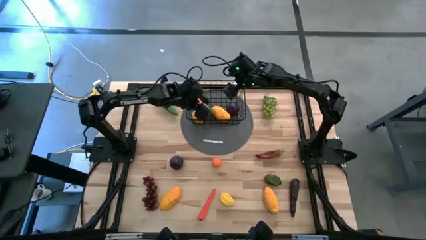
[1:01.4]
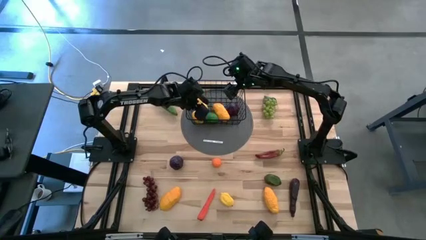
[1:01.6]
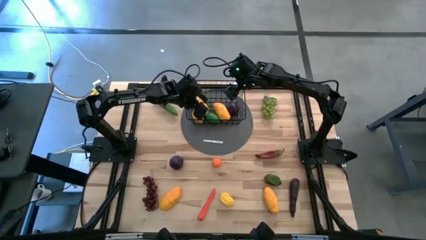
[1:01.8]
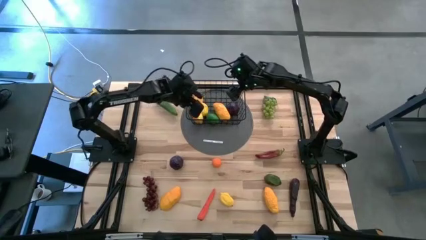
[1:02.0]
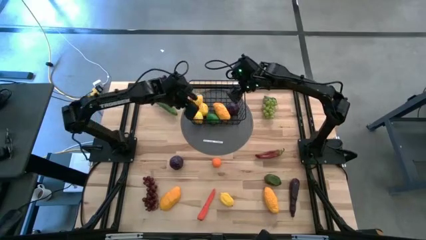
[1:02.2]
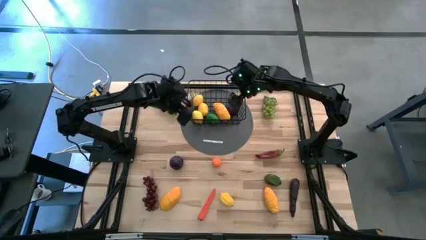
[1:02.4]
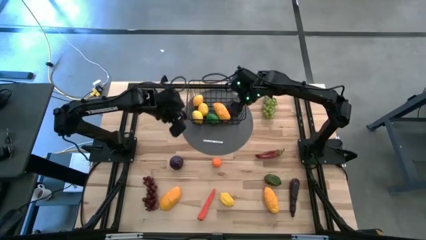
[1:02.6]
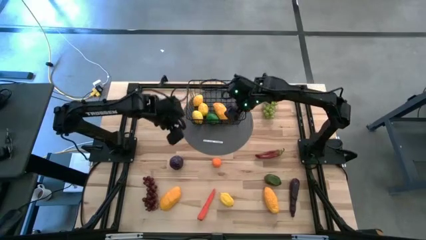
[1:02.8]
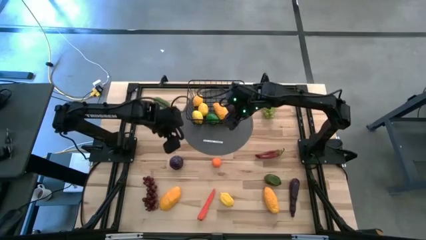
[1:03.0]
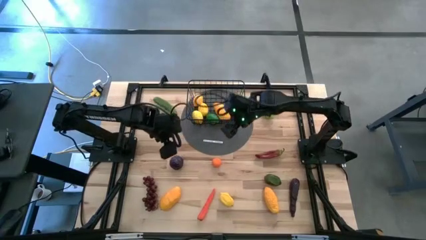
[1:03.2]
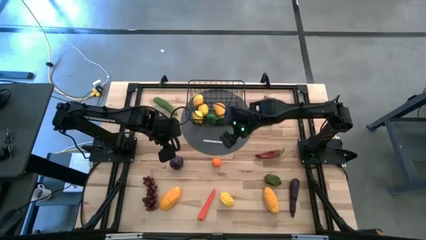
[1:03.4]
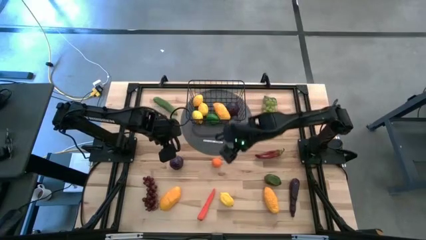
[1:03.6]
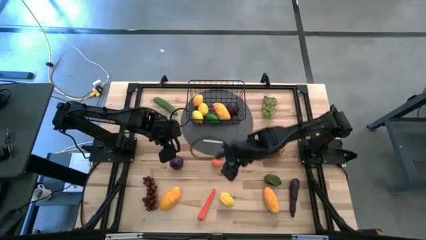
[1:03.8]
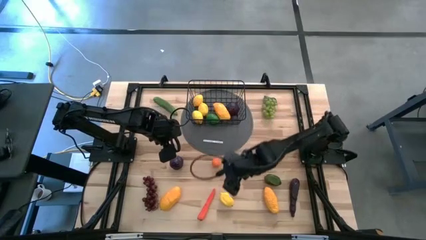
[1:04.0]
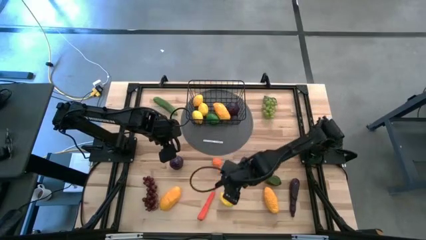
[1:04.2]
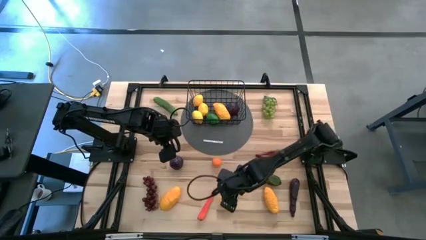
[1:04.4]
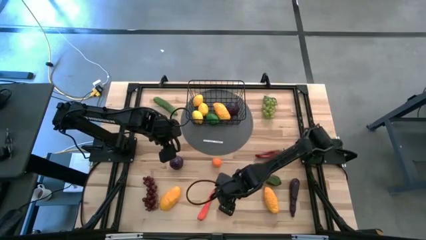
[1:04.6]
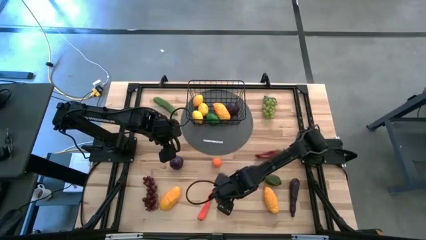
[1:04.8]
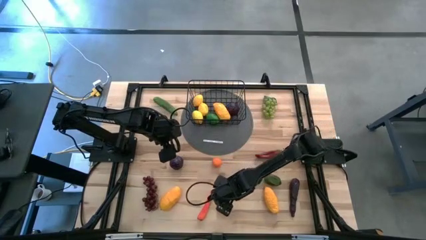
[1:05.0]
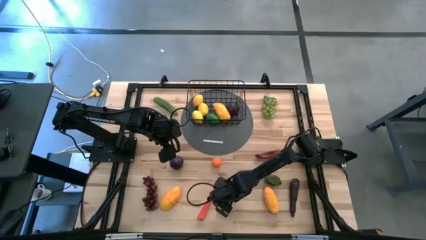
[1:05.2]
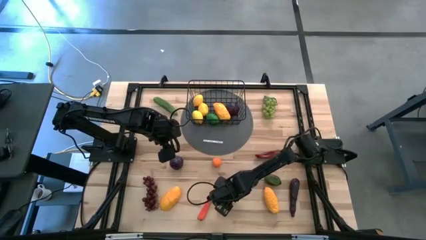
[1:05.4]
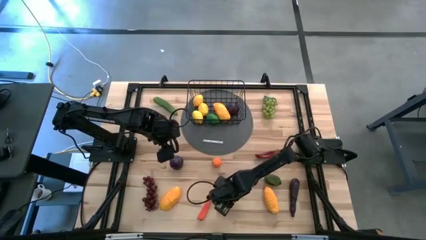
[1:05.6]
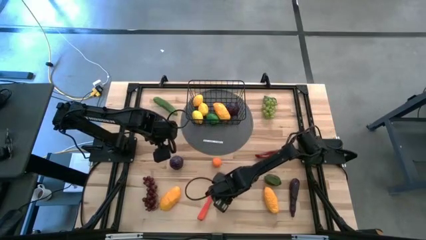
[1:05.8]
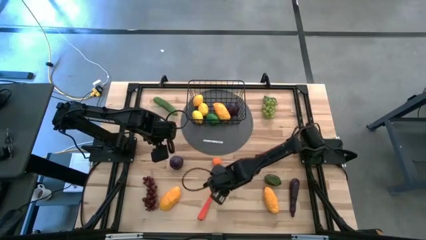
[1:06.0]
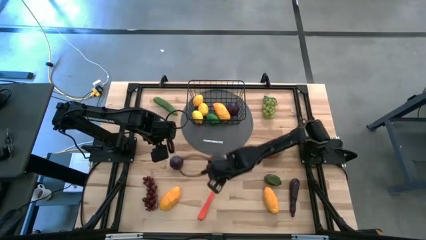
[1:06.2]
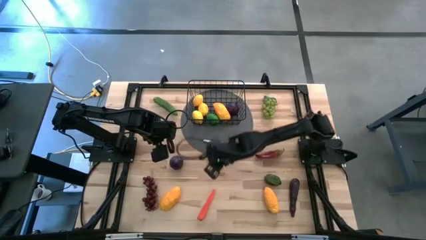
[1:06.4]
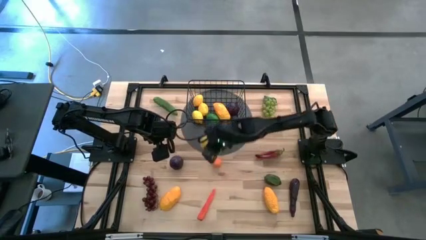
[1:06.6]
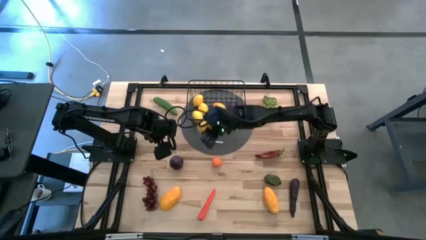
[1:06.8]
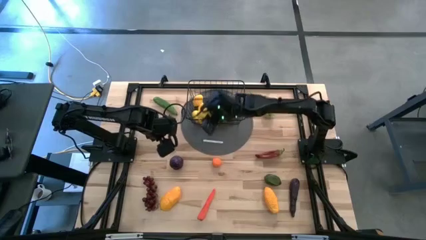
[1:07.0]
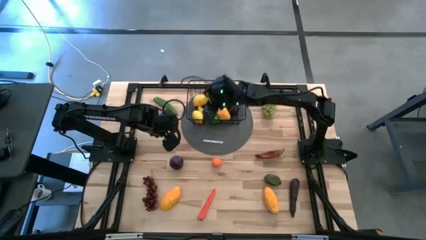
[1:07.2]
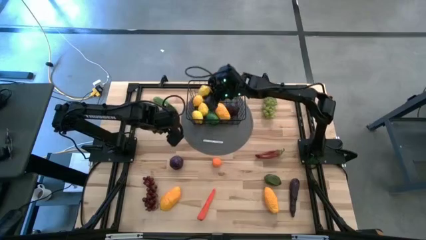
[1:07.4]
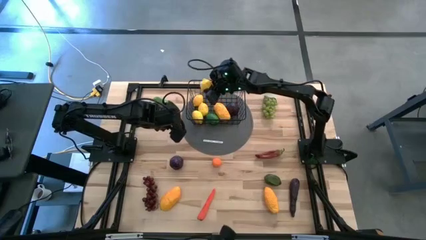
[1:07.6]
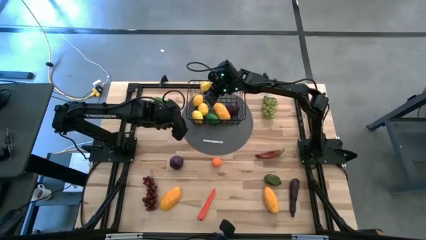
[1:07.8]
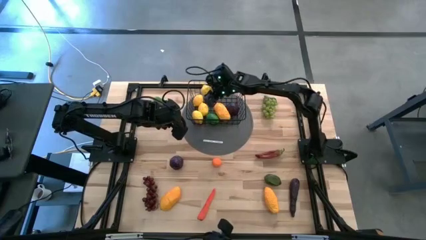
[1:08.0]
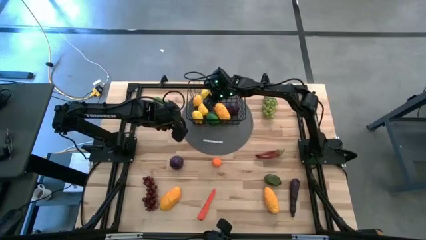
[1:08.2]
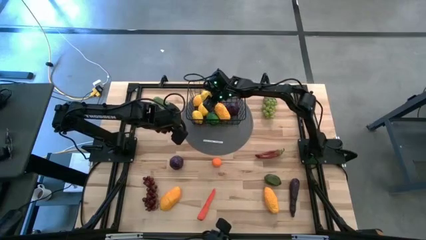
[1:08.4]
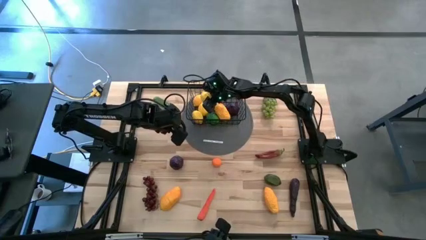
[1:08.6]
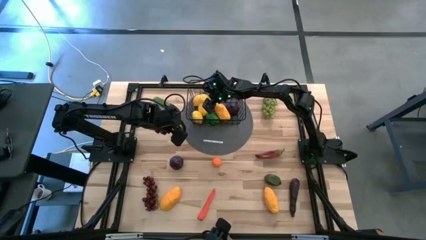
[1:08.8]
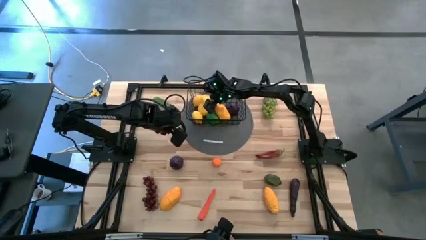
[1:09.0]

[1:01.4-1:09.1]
Task: Build produce basket
Put the yellow lemon into the basket

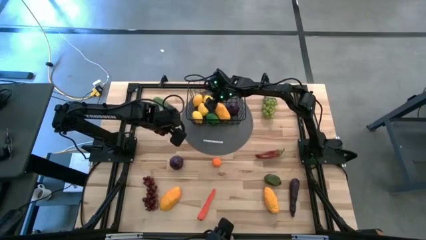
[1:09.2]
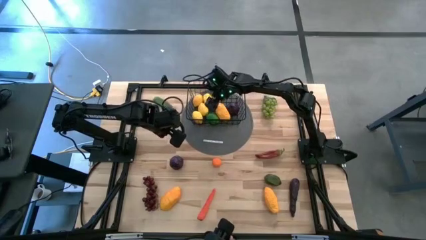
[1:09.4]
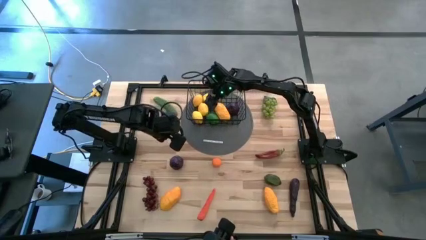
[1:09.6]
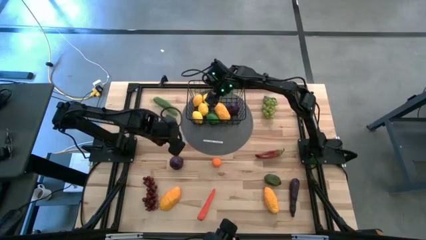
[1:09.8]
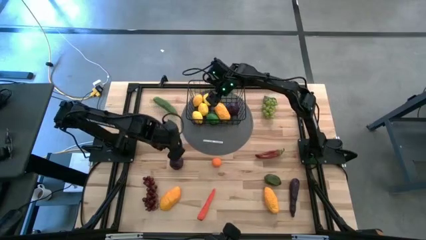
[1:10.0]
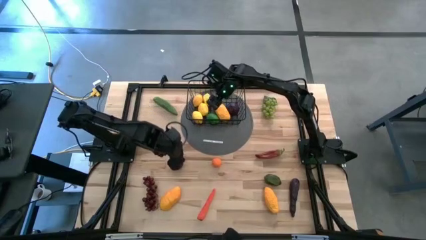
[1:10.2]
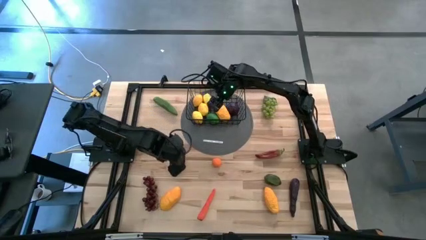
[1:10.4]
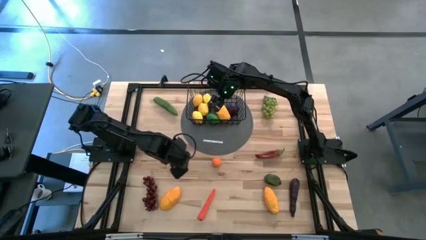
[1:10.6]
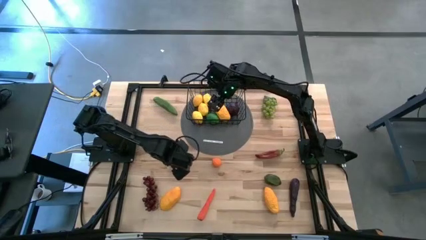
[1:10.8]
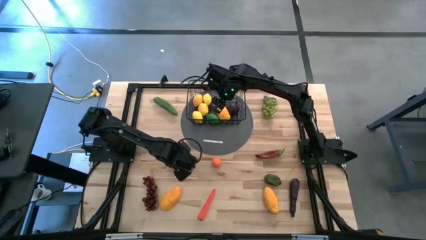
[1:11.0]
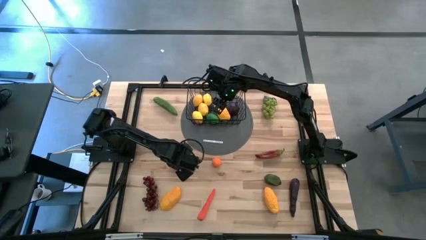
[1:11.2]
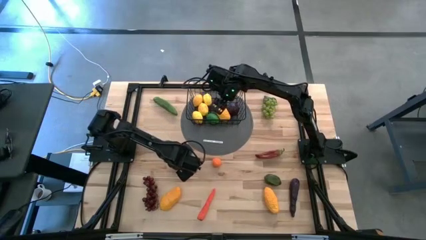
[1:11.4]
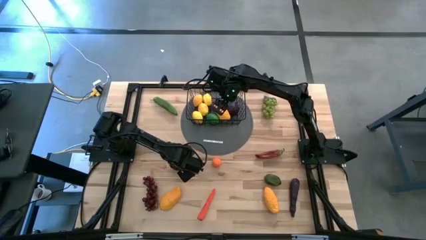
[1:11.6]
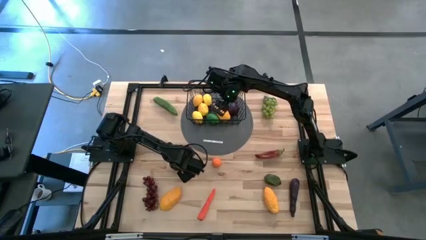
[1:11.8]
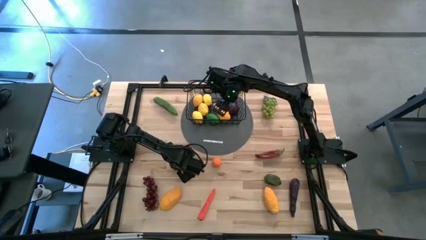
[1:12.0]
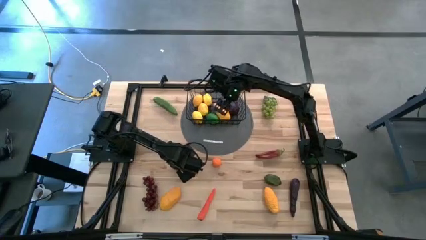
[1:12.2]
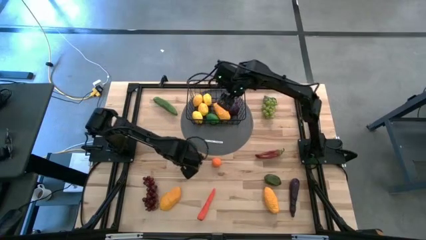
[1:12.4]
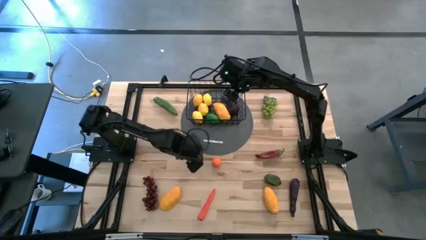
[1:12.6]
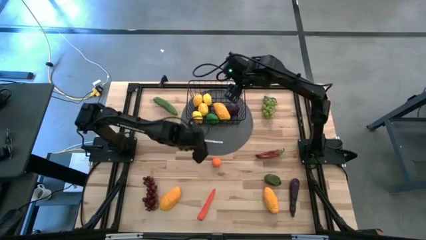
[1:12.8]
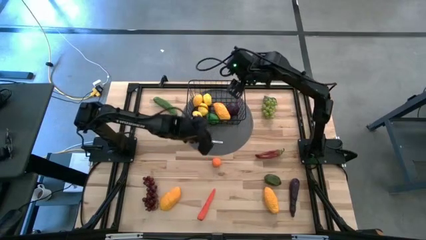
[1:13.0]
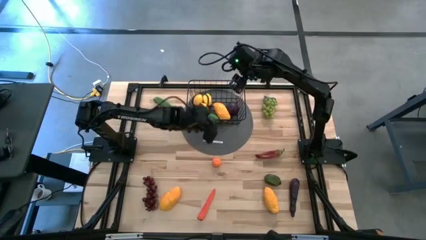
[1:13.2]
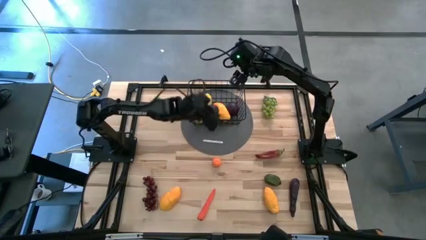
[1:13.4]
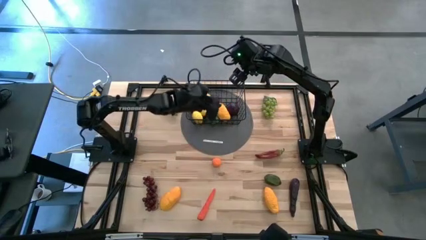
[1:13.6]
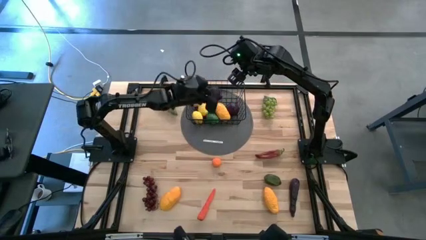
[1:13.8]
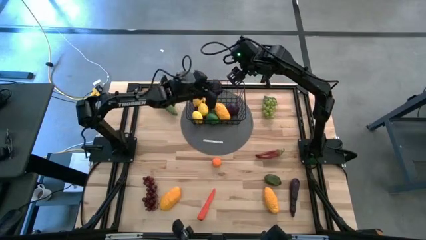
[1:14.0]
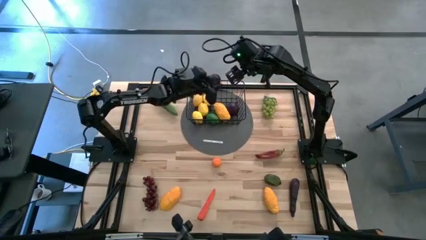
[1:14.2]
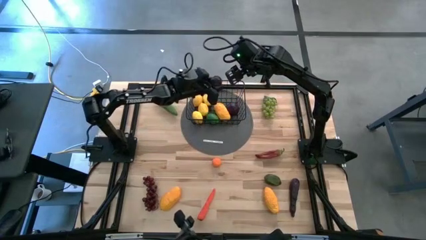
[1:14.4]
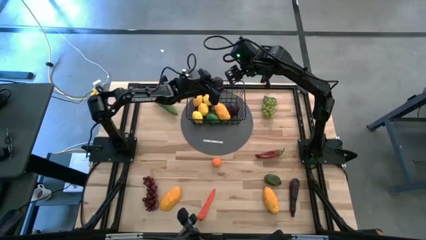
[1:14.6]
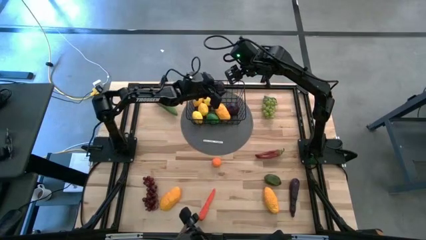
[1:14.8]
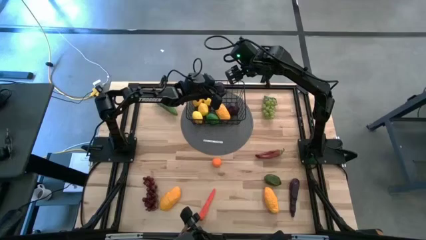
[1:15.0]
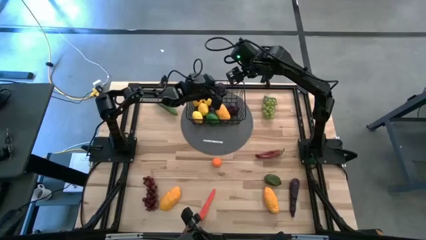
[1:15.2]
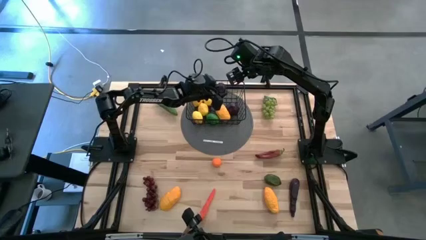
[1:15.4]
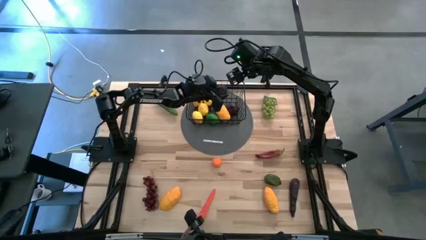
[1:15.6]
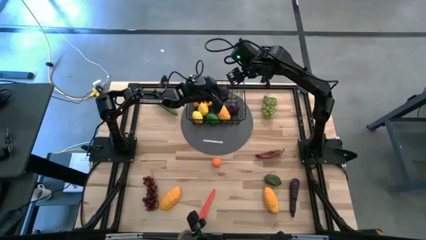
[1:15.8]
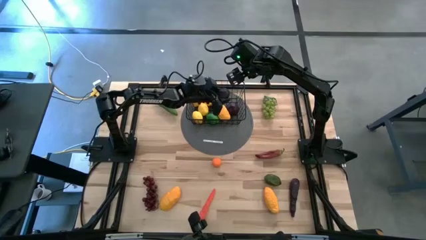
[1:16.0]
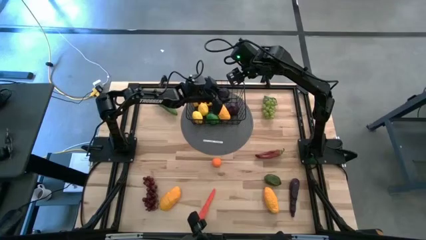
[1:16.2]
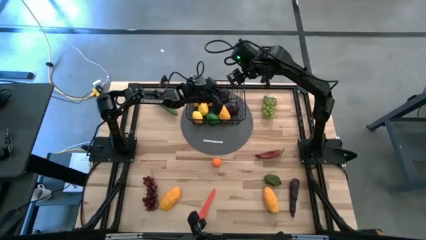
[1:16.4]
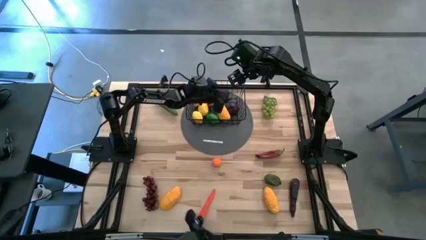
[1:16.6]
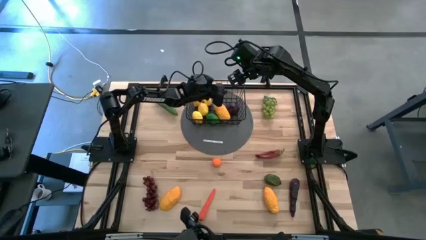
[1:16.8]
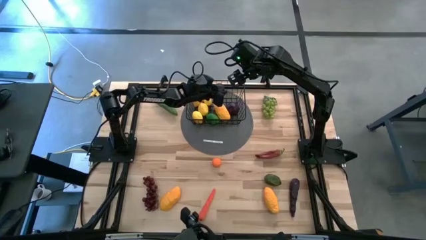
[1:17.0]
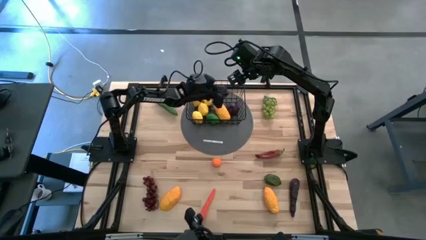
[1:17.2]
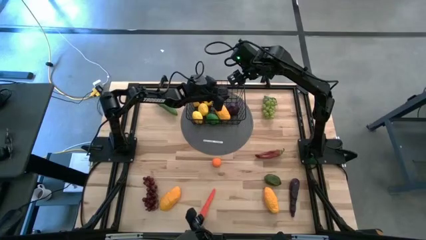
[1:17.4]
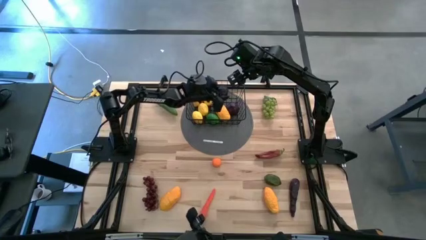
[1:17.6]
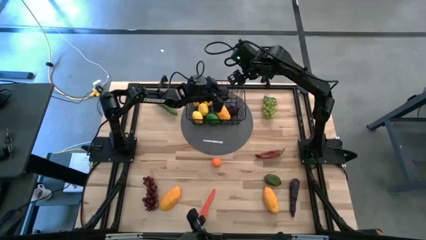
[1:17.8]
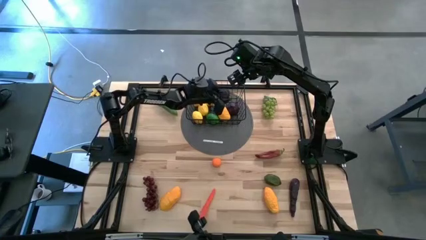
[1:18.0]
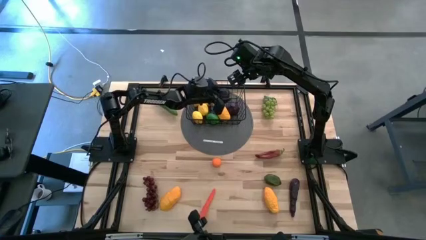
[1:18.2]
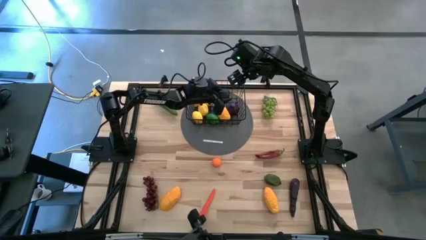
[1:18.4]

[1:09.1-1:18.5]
Put the black plum into the basket
